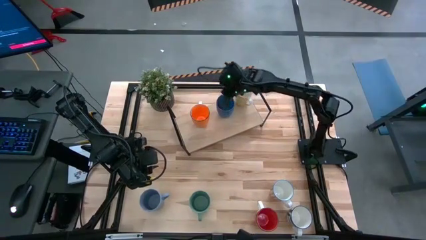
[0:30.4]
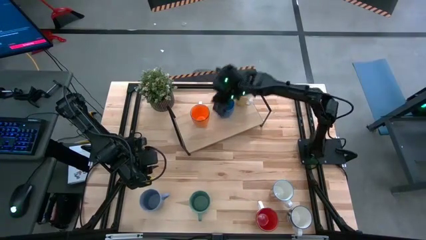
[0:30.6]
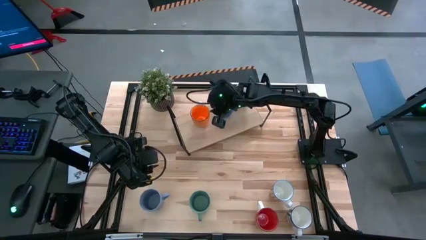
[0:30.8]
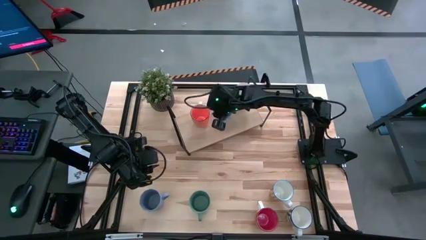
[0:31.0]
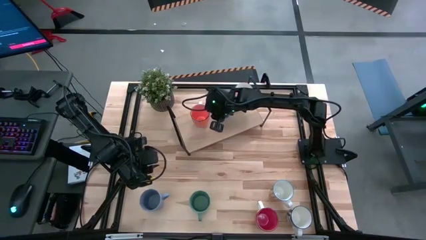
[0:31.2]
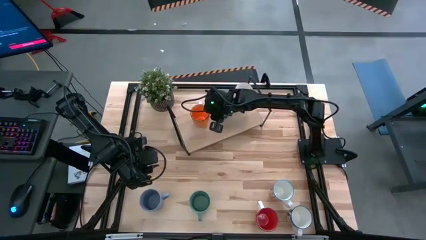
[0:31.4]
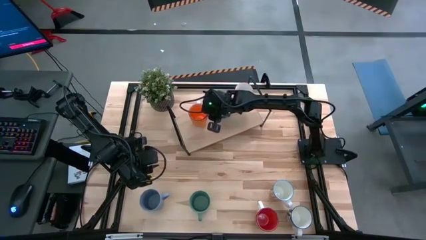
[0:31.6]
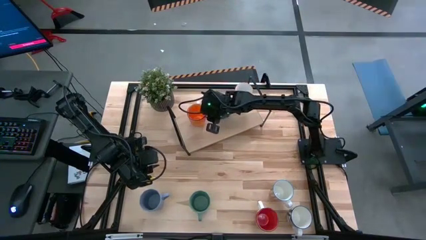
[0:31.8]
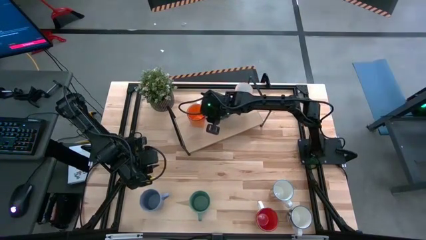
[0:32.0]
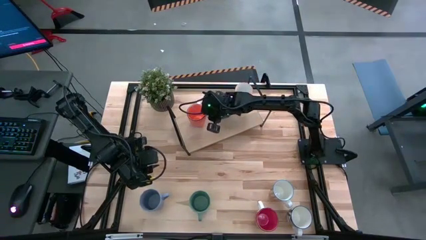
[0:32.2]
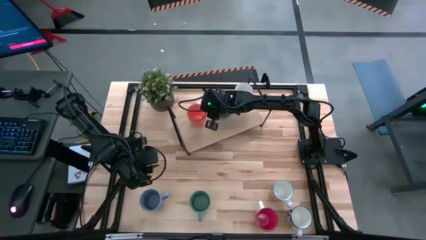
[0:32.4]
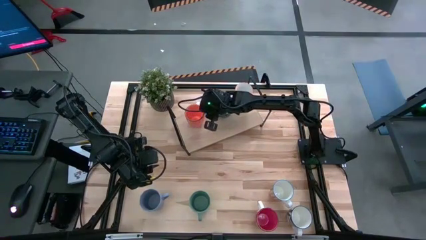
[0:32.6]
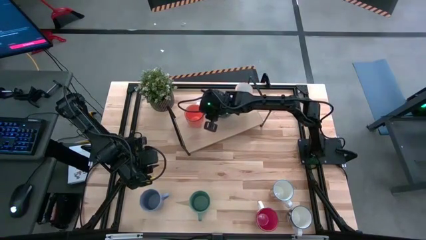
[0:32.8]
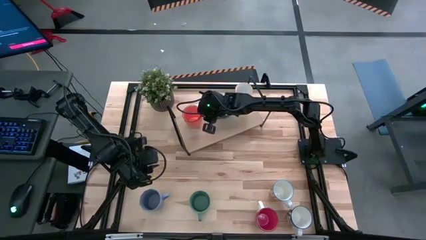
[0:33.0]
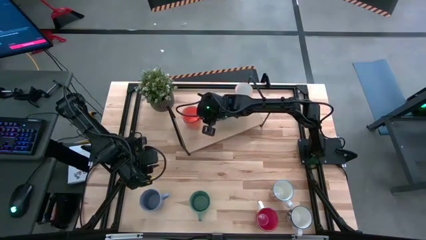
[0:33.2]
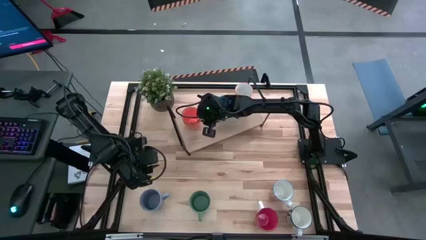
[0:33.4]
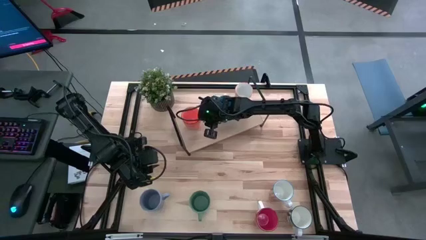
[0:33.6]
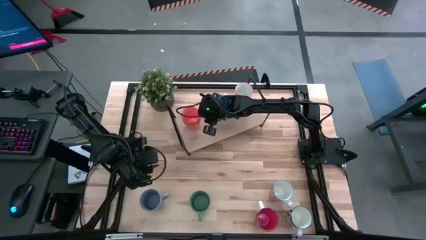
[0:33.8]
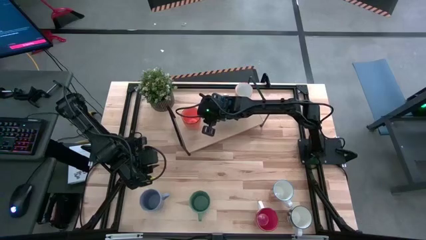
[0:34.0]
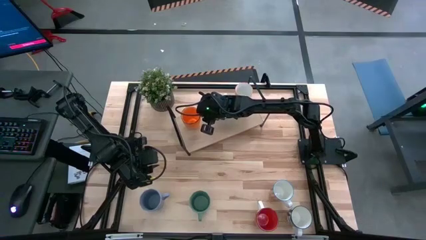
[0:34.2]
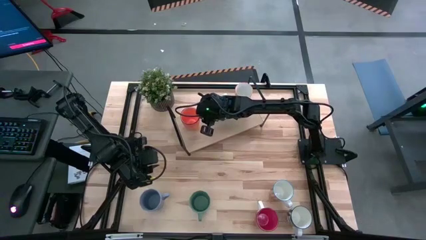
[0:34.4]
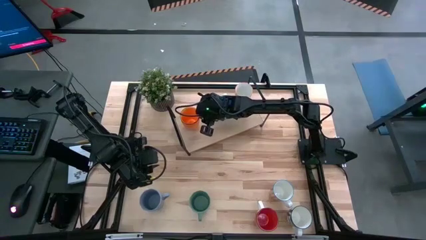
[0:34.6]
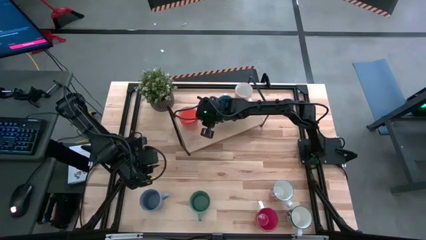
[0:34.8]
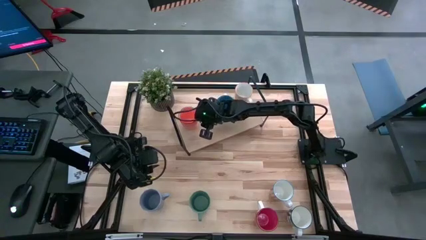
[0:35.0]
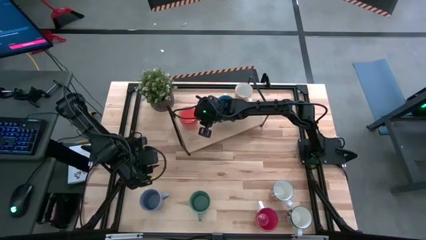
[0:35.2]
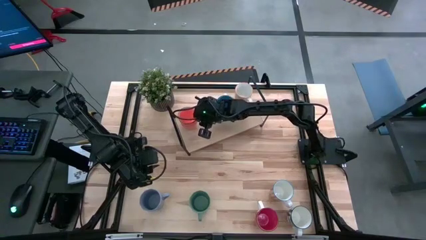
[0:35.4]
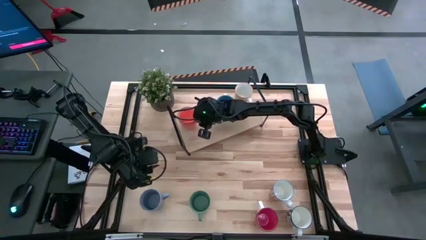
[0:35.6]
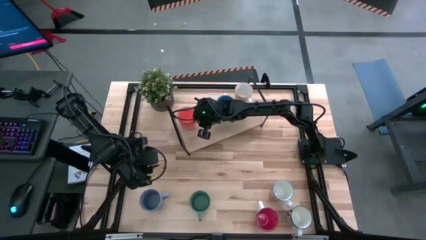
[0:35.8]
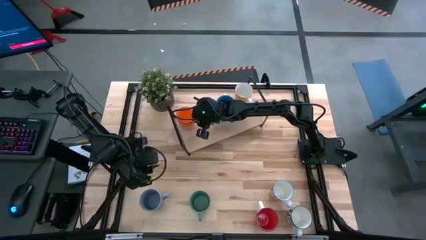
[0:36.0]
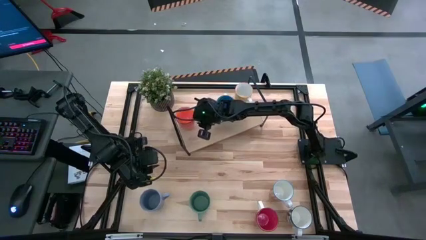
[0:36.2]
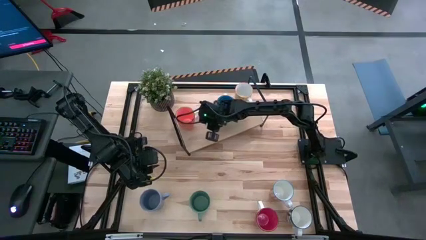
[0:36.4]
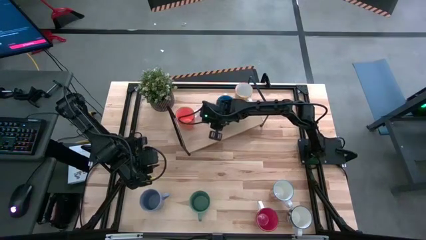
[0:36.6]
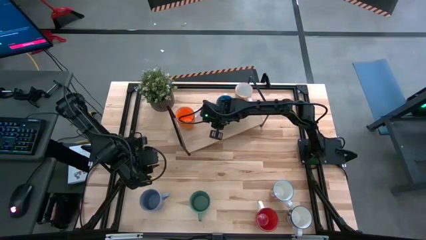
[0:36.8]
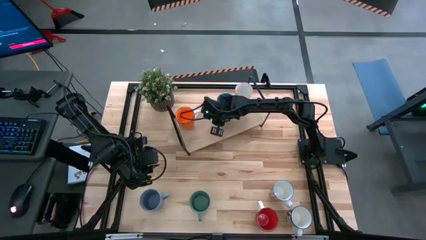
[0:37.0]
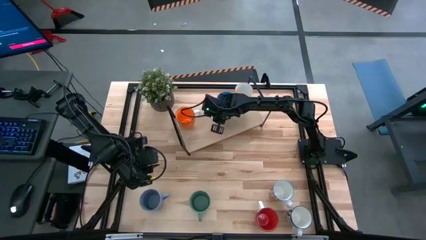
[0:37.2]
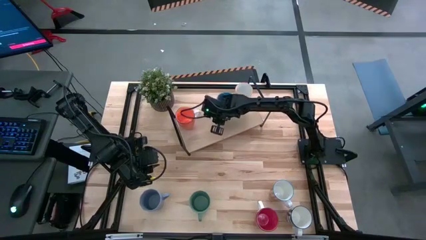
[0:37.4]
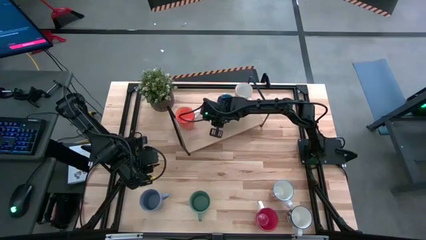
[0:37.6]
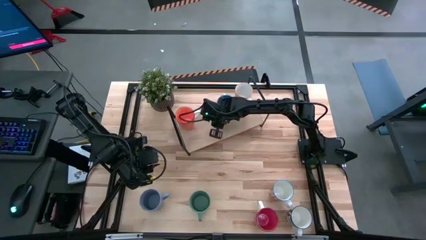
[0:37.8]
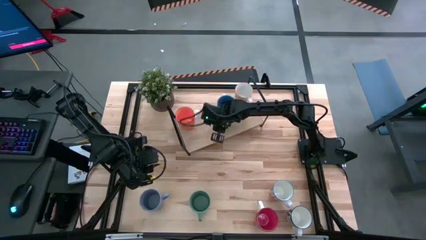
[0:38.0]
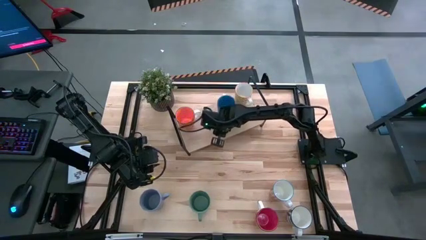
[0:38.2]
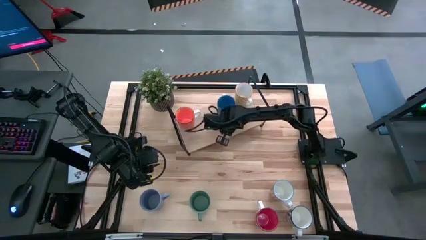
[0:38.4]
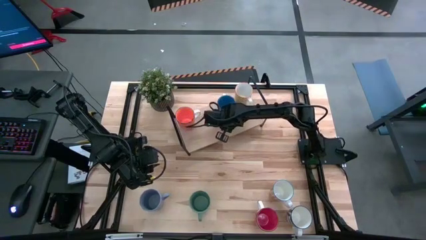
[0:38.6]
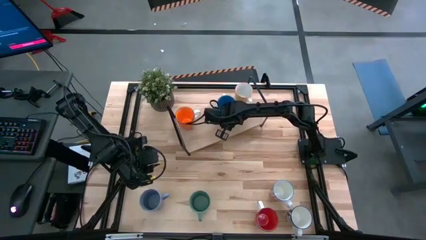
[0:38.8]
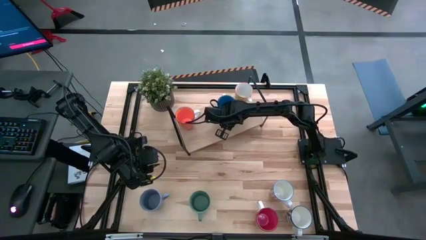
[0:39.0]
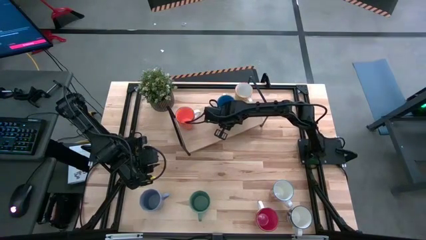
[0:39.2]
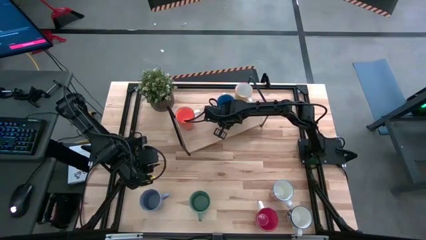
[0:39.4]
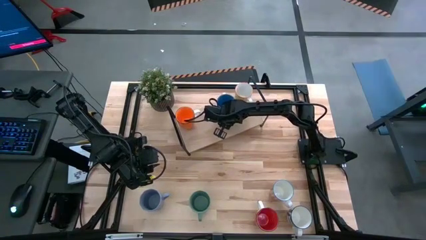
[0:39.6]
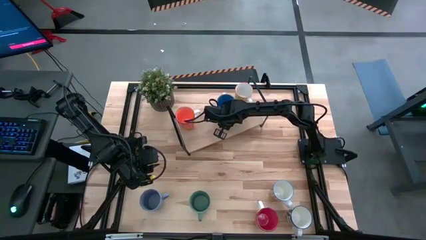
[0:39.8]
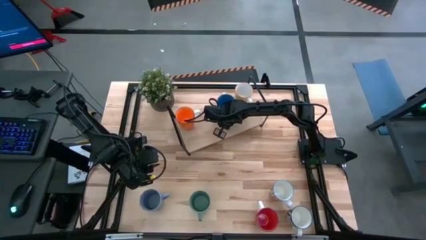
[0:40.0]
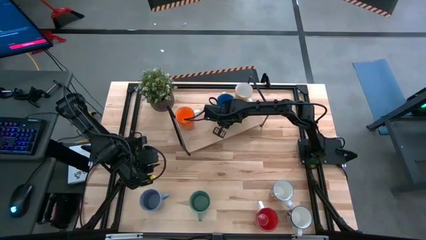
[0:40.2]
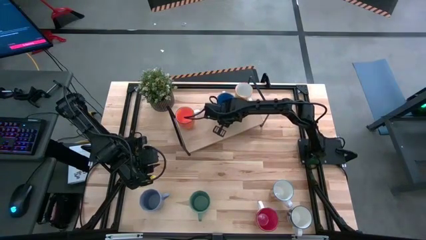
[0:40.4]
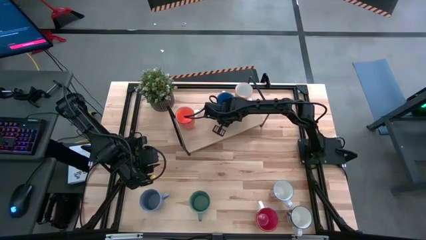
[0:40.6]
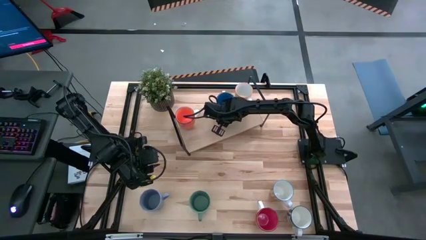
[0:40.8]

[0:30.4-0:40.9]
Task: Place coffee mugs
Adjust the stocked mugs on the shelf

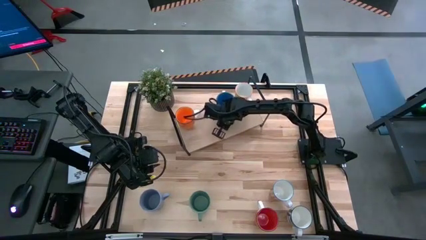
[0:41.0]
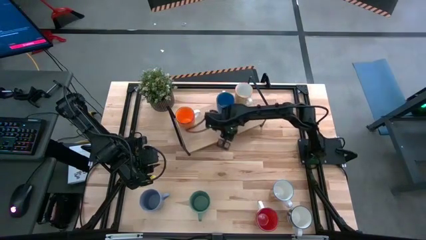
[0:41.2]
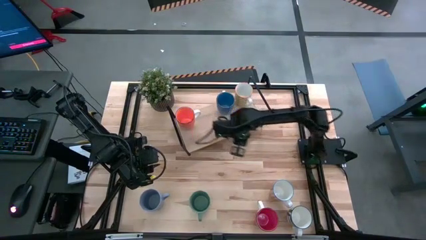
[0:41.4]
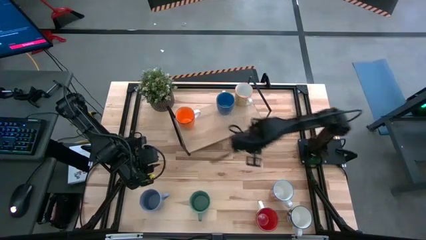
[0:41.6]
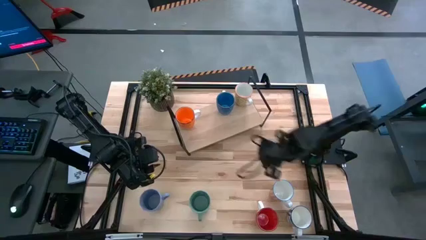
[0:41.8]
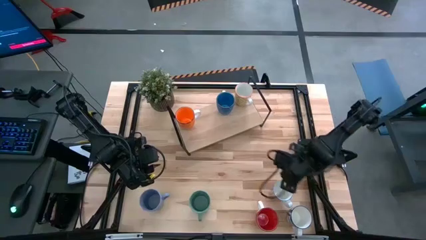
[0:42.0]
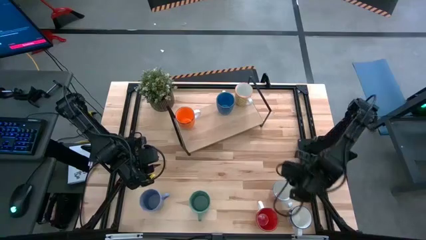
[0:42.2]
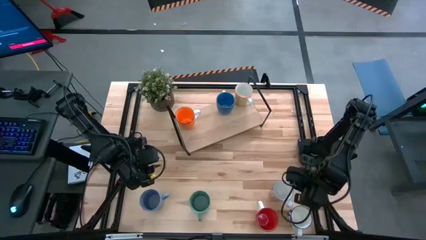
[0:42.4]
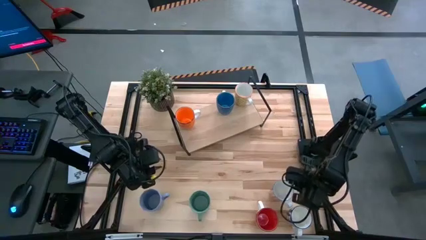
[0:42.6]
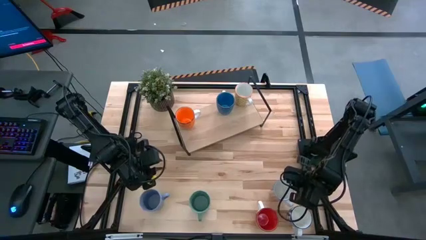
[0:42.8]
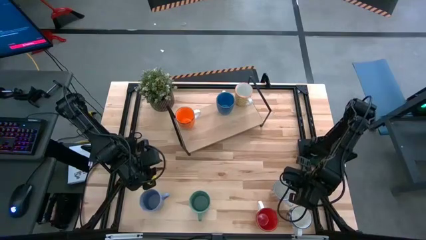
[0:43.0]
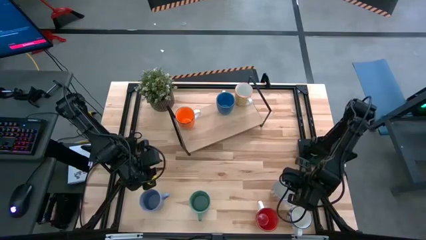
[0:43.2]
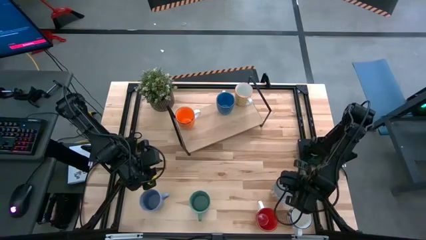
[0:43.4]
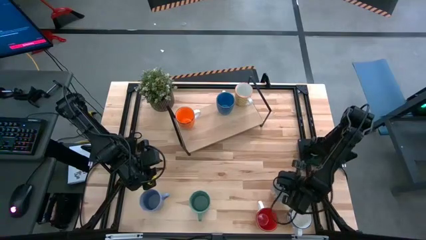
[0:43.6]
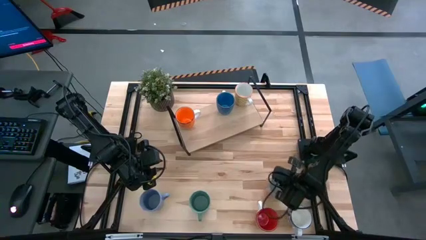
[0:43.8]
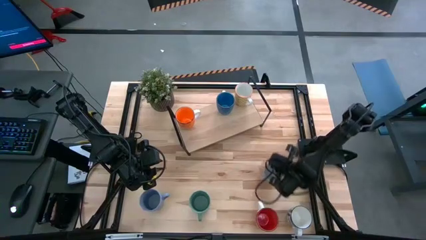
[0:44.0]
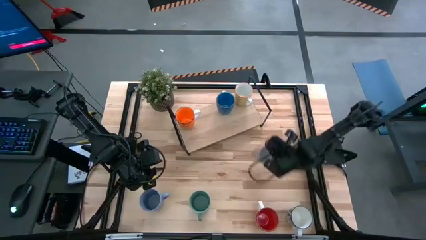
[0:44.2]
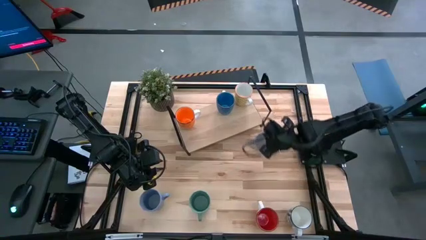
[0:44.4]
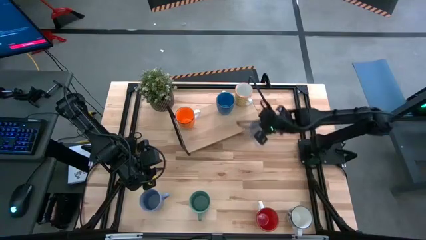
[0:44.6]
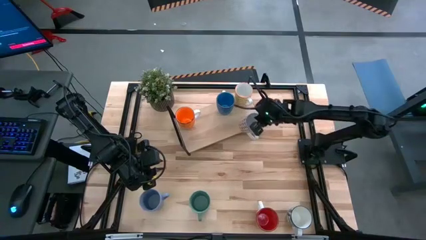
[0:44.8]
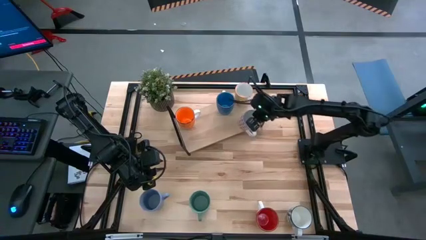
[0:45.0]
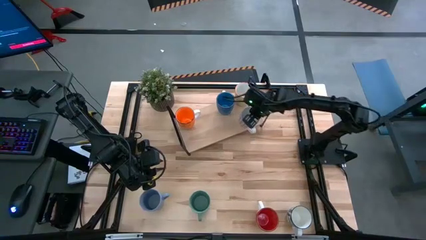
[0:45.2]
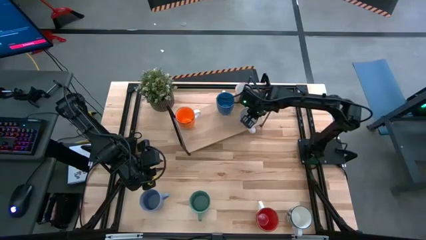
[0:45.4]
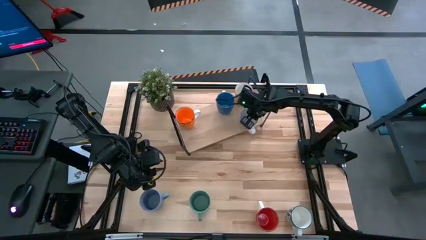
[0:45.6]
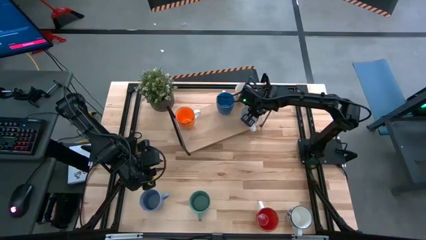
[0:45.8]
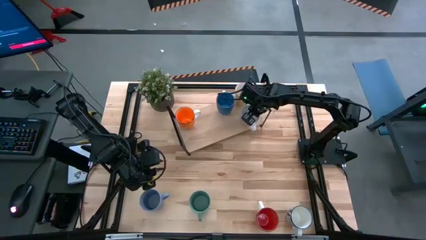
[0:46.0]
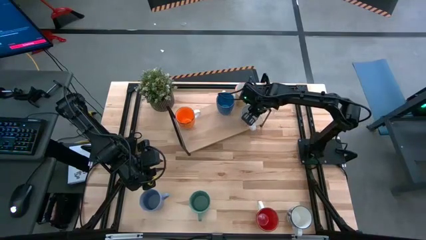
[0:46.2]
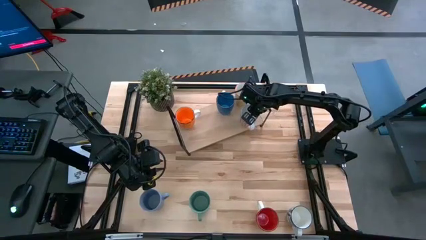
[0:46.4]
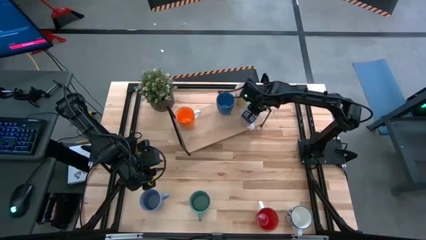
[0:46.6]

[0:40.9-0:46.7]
Put the red patterned mug on the shelf

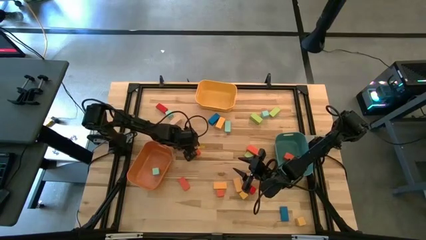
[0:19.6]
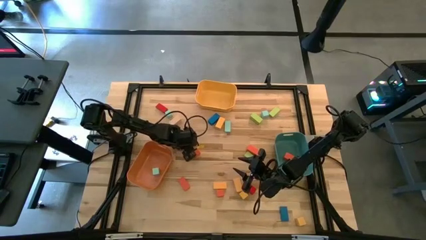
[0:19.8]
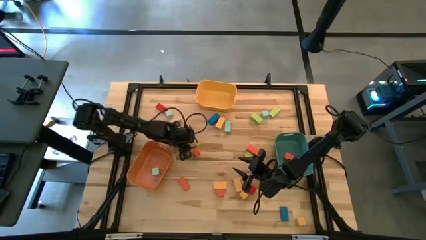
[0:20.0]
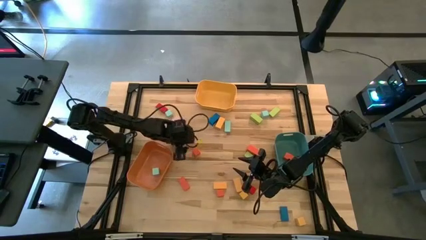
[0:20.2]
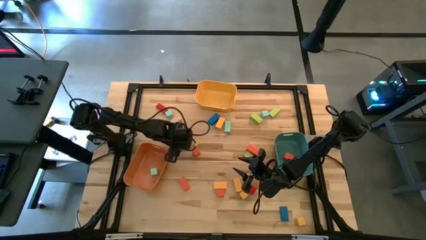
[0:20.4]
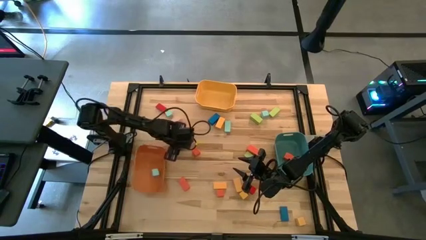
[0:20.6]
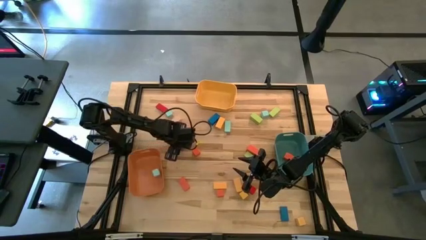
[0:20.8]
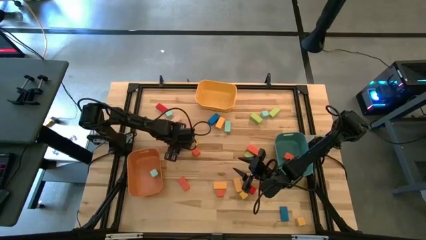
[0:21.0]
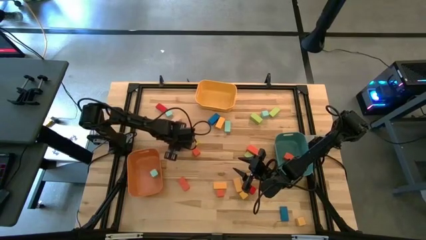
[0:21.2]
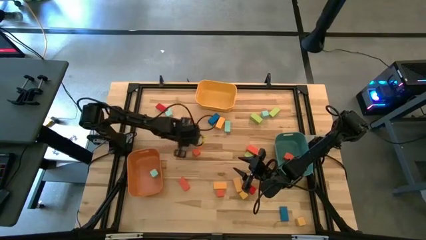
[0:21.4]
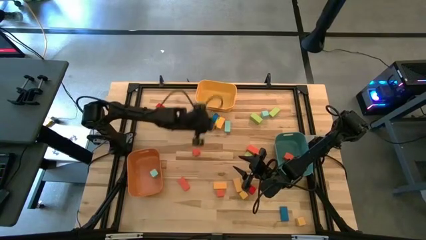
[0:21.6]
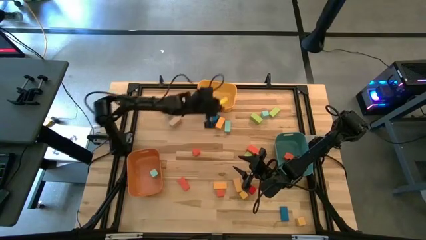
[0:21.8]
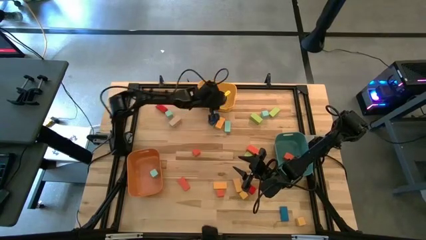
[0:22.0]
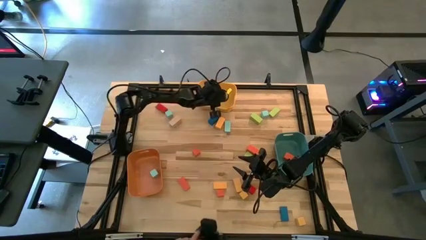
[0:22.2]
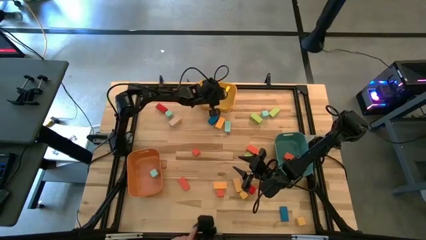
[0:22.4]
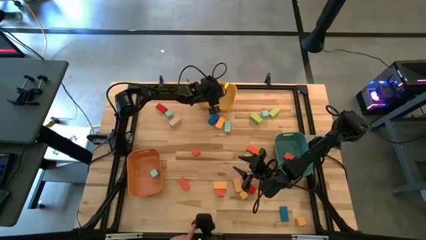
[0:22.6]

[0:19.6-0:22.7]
Task: Sort blocks by size
Put the thin red rectangular block into the yellow bin
